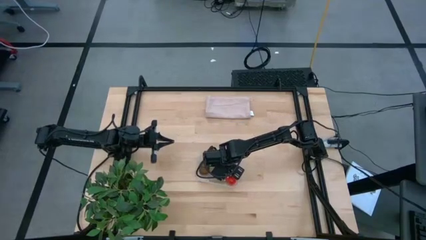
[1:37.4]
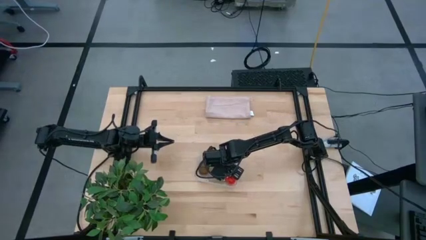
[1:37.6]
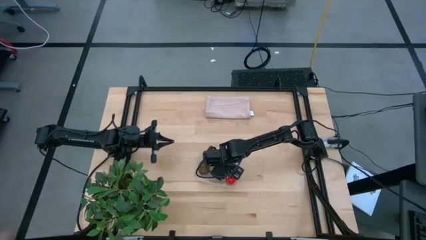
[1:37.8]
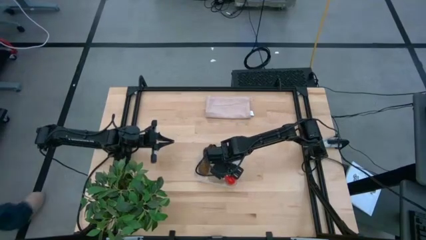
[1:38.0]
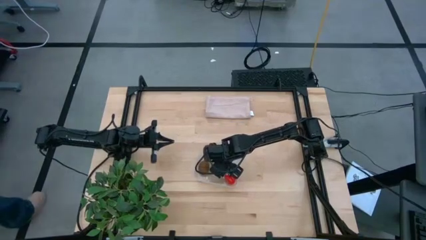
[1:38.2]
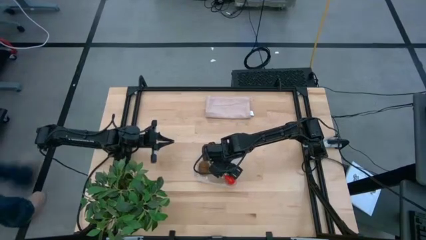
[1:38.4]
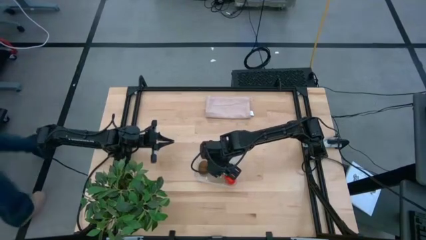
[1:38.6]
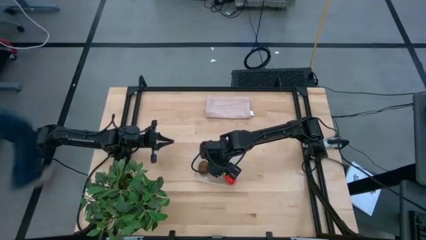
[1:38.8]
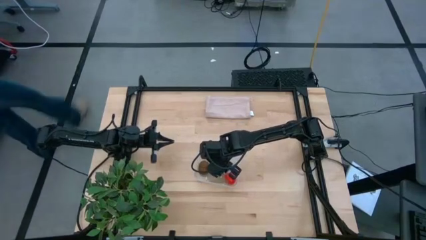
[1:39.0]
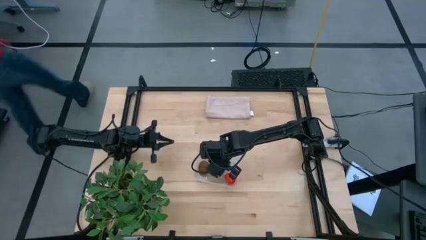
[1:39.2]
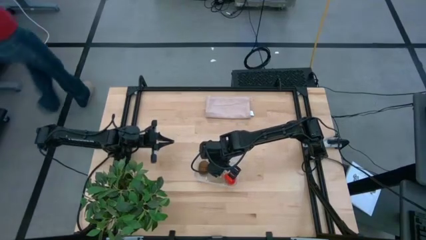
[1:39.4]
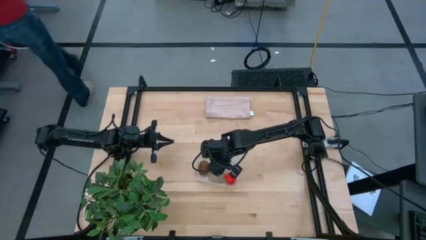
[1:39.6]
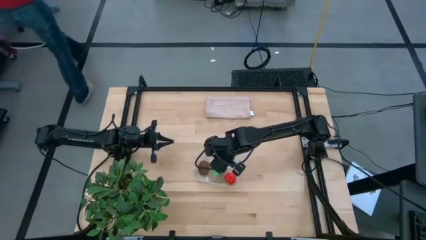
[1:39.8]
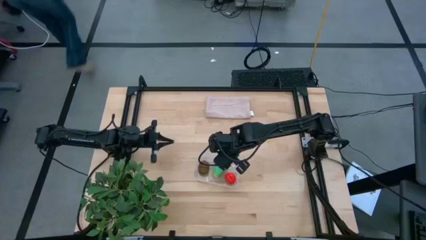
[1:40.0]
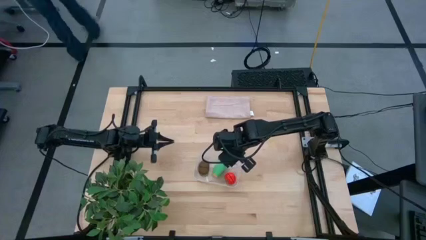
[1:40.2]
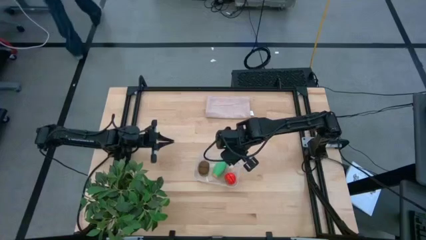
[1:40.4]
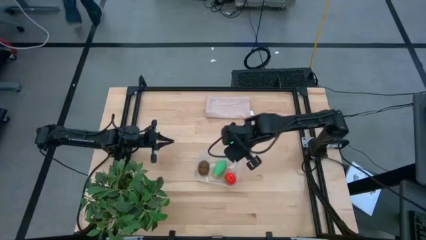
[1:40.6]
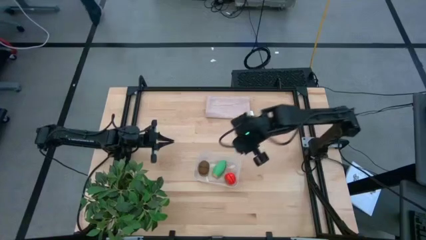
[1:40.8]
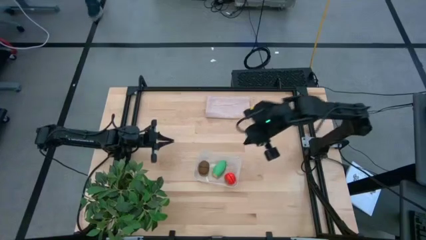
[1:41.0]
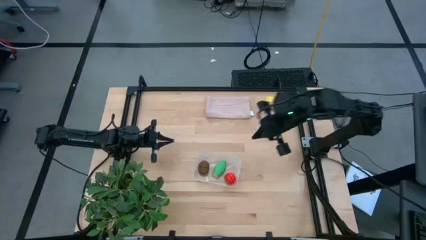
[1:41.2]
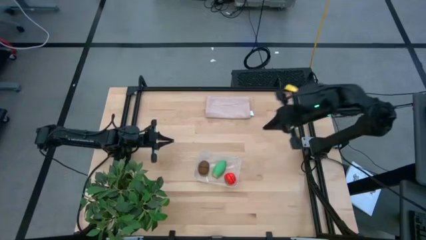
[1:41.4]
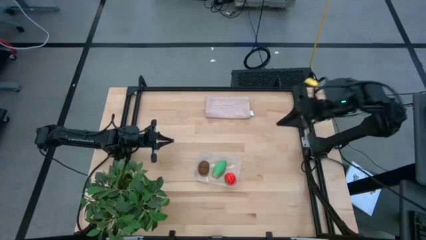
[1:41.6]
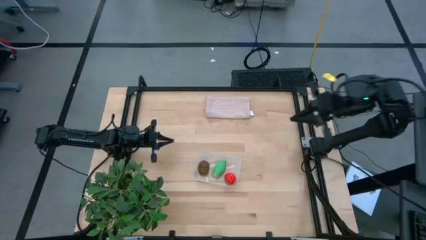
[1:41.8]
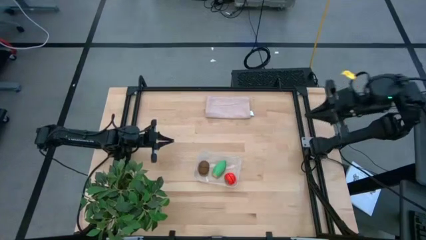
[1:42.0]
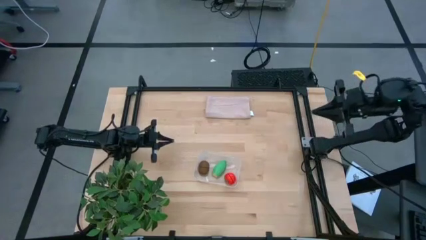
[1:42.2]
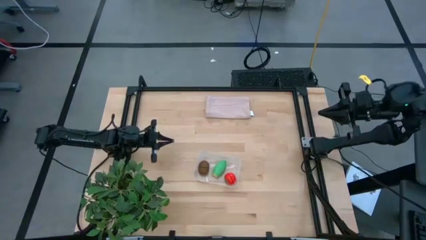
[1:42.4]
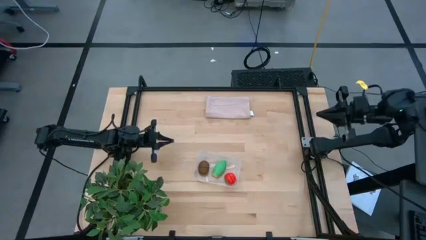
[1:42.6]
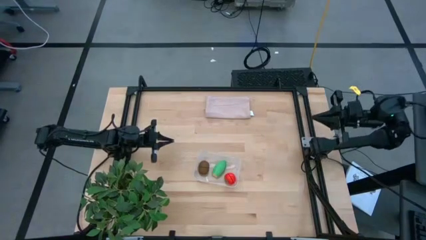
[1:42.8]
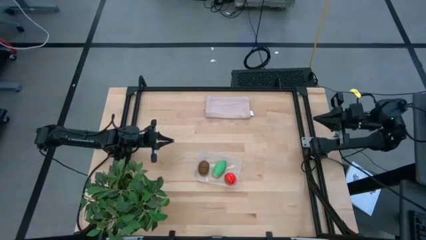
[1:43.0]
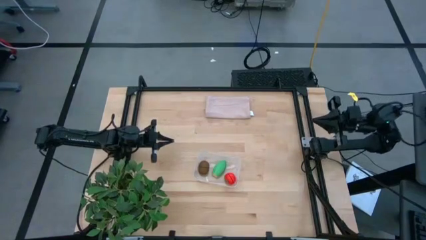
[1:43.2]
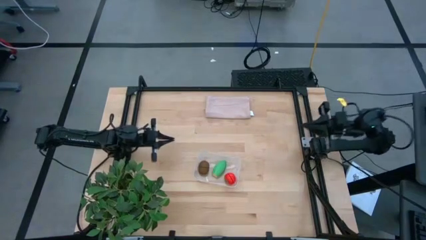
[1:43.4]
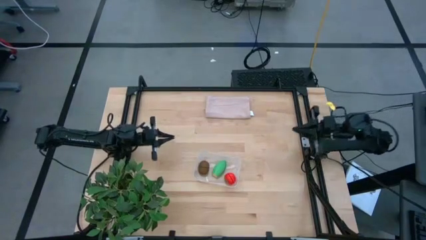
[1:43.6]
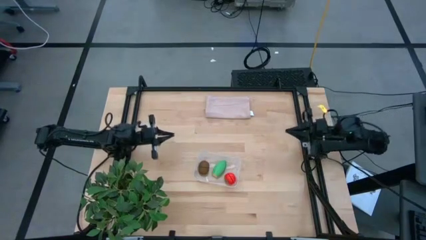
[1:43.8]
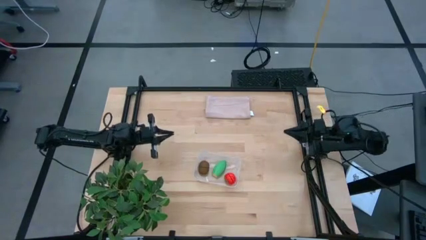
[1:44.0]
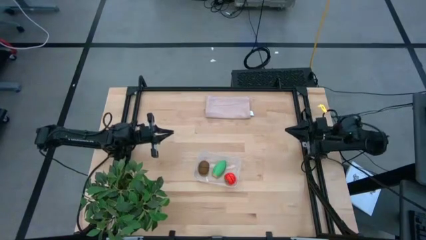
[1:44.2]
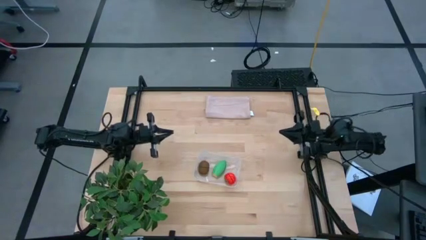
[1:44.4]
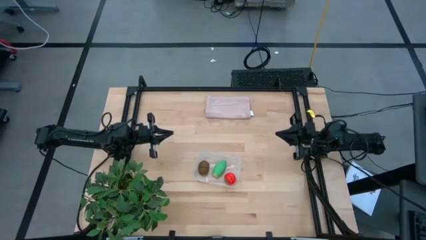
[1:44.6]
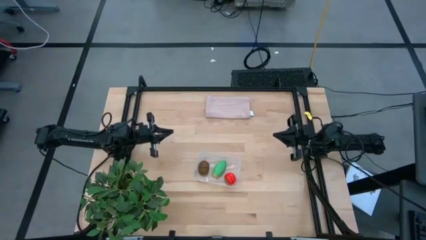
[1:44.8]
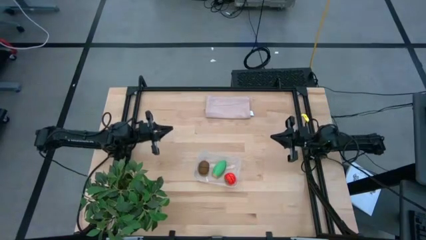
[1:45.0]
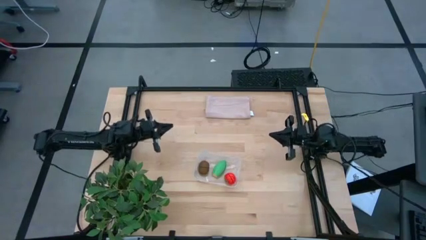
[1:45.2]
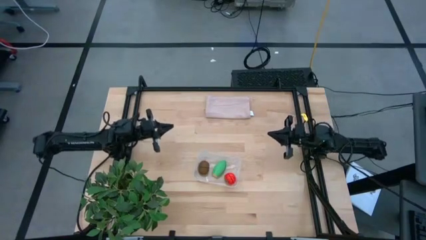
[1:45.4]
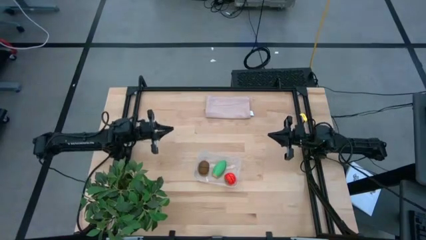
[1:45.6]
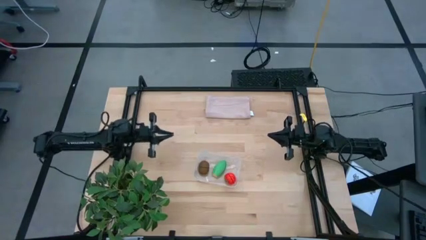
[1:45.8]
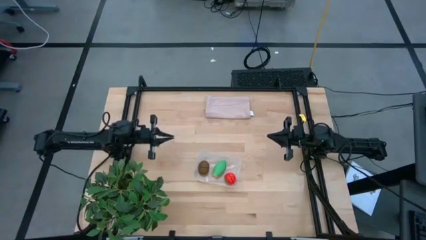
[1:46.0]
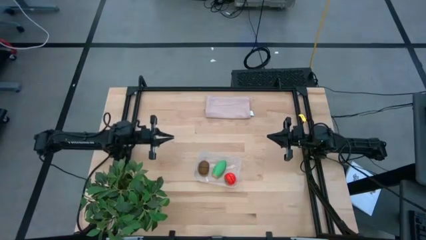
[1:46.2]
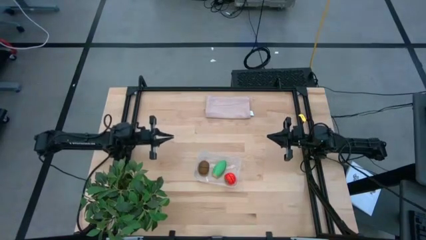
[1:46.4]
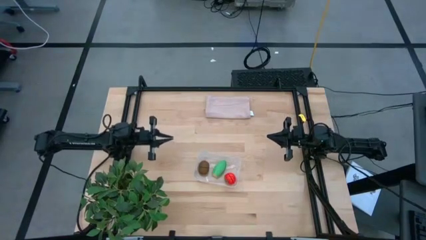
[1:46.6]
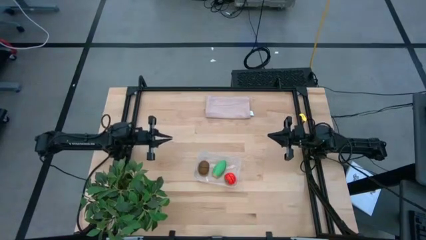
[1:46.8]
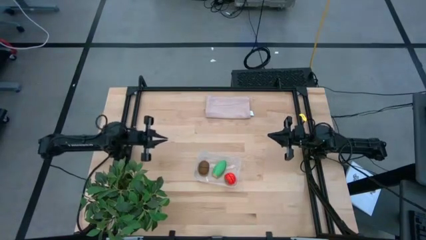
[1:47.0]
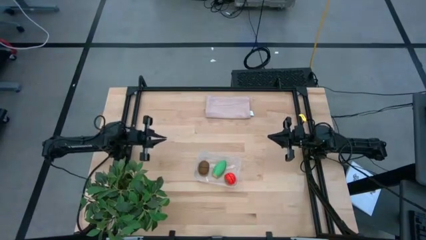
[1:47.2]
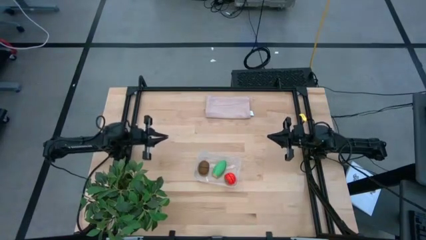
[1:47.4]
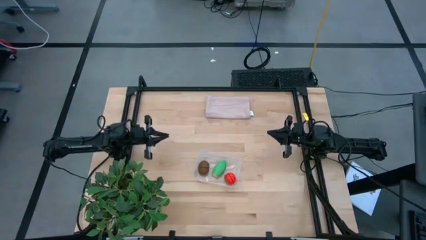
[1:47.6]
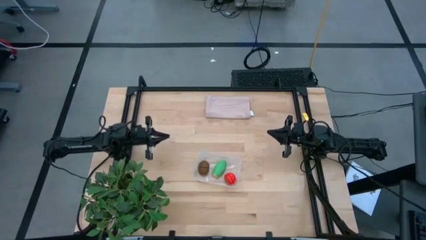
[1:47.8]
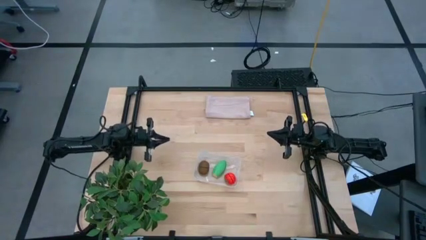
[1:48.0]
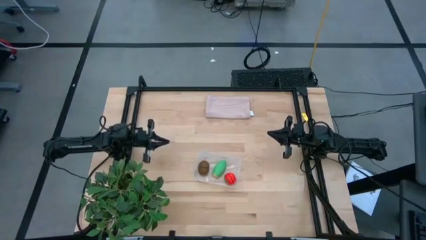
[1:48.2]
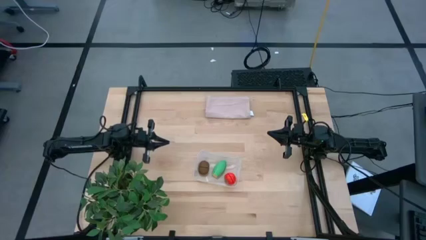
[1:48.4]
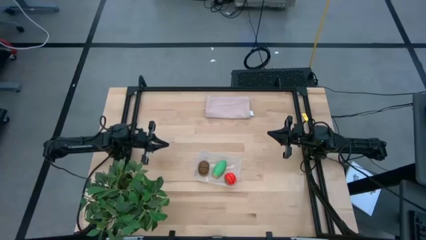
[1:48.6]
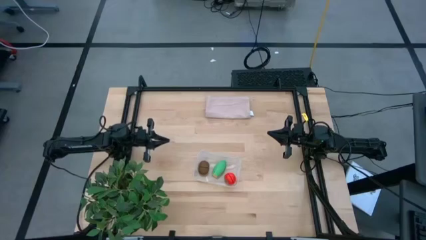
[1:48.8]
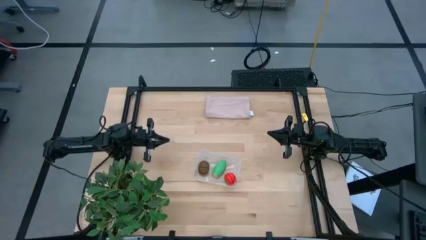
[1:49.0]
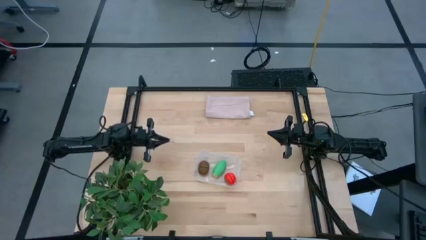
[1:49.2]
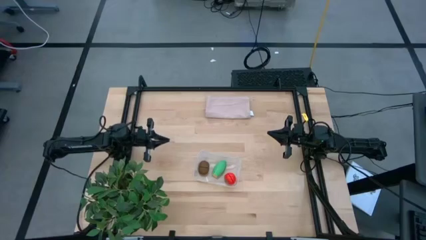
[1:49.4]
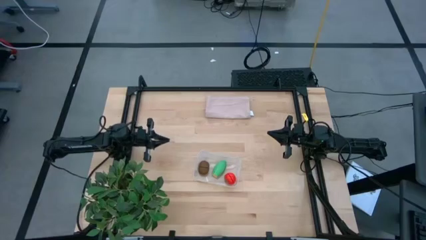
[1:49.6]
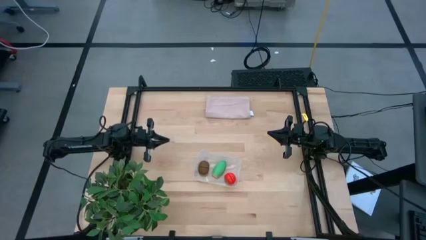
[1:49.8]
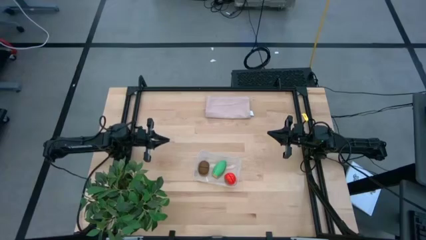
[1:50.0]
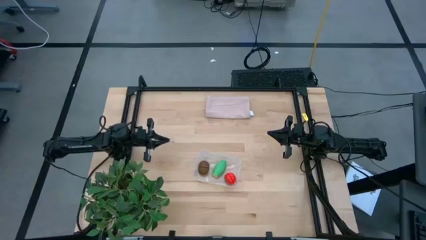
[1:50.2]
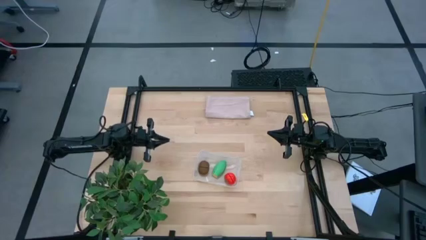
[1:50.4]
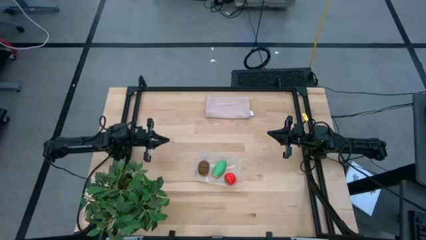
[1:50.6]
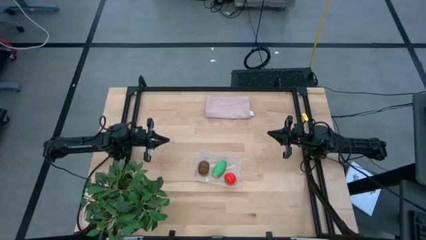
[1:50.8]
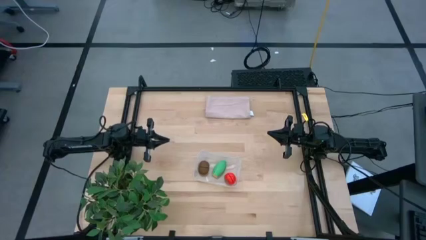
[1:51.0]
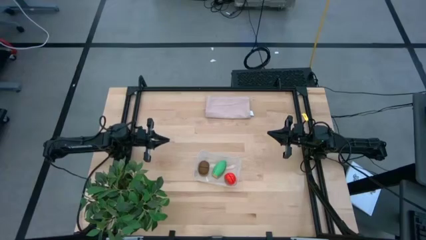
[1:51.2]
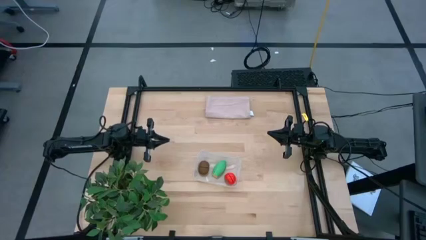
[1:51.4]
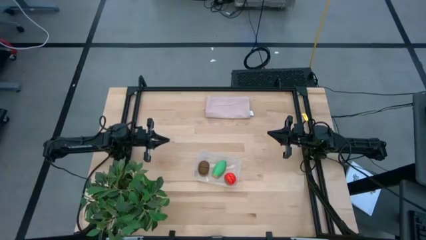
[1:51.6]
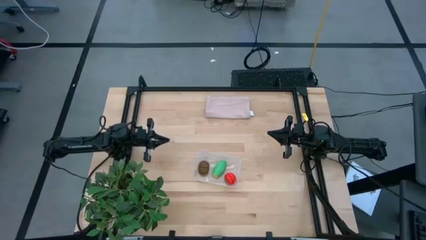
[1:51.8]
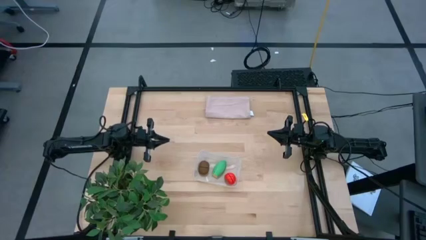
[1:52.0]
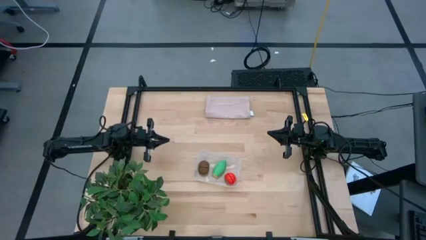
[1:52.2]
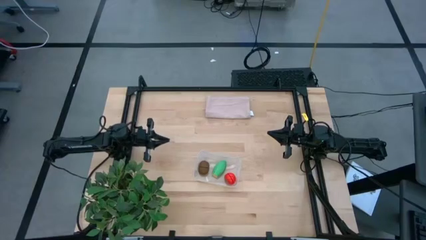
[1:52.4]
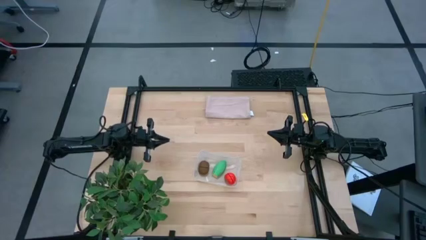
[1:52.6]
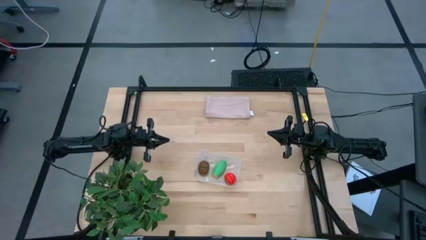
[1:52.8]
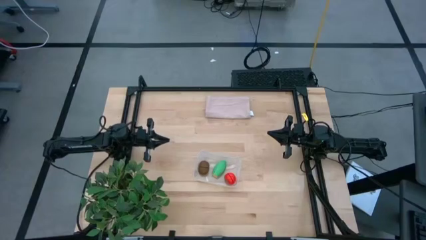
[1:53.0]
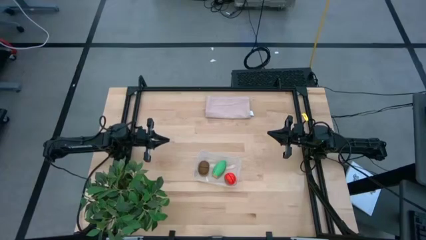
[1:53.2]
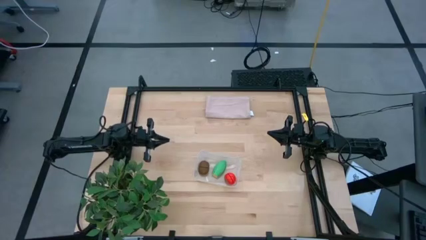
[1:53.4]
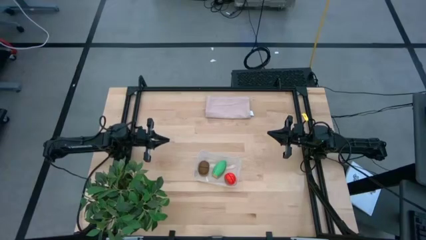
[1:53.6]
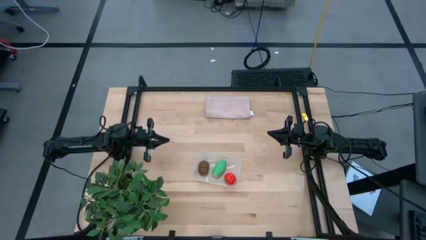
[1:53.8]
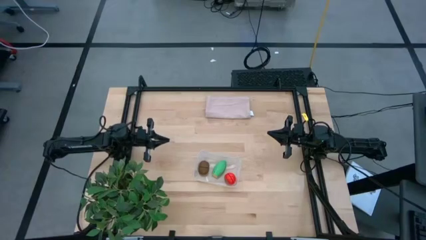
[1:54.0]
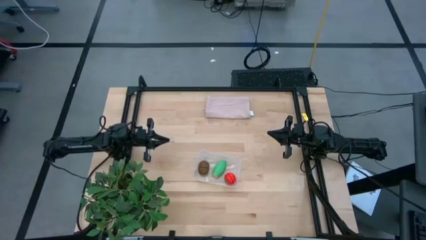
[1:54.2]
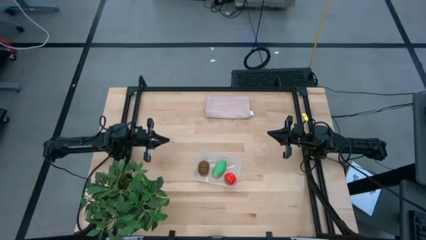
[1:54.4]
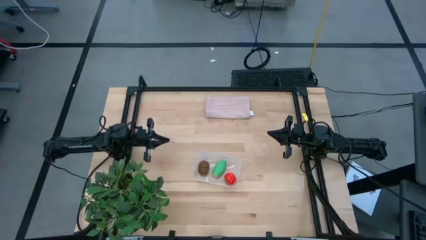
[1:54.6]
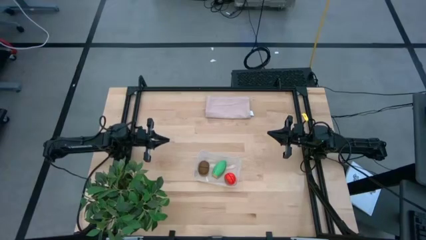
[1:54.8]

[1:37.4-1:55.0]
Task: Pick and placing Produce into tupperware
Return to Home Position
